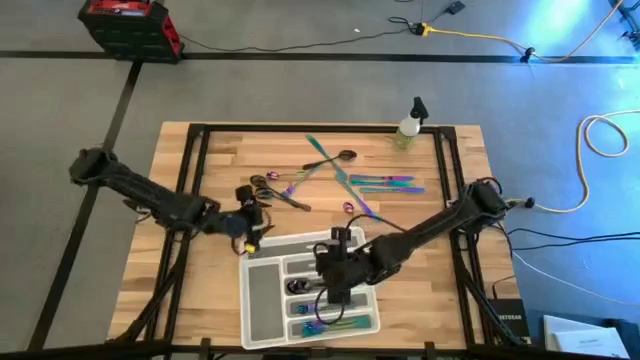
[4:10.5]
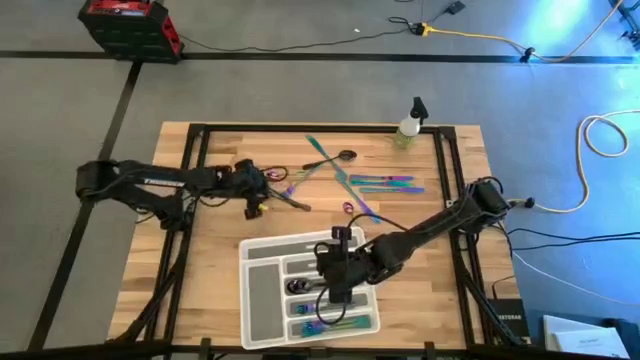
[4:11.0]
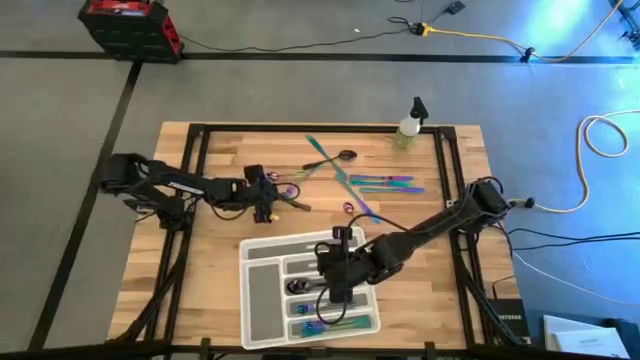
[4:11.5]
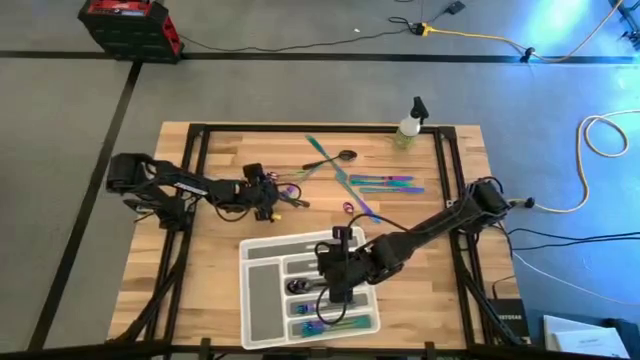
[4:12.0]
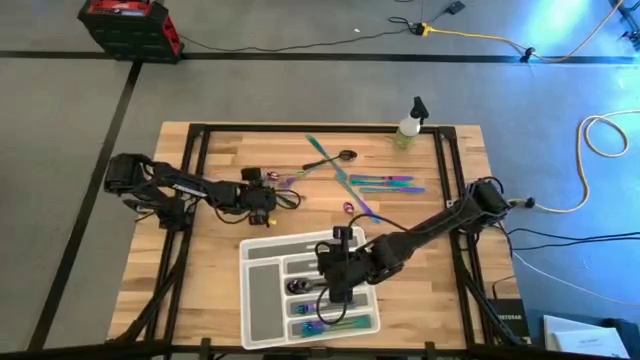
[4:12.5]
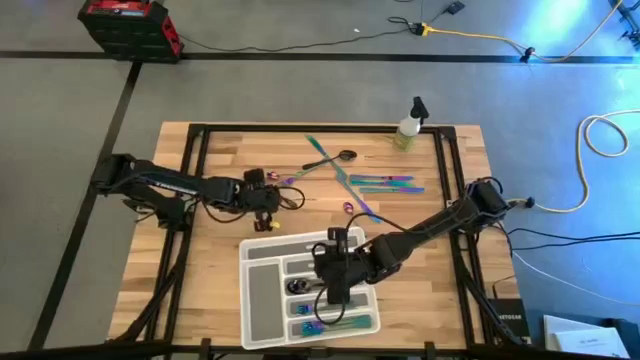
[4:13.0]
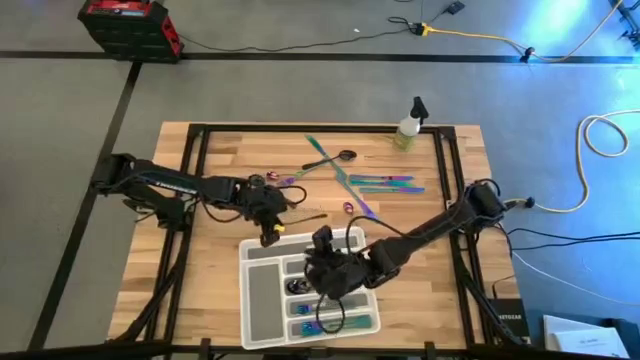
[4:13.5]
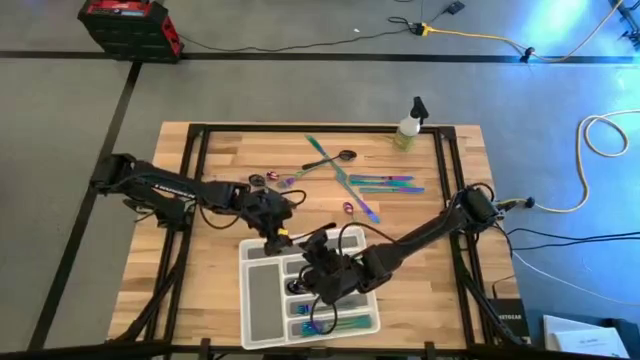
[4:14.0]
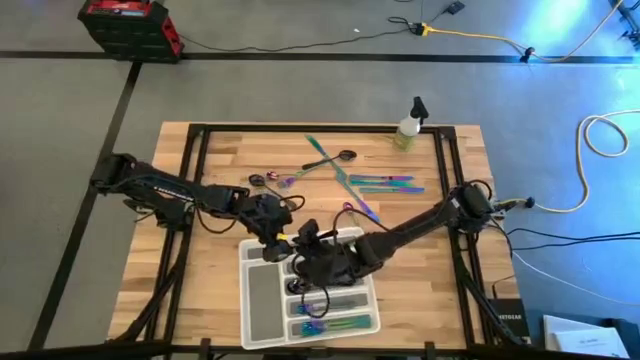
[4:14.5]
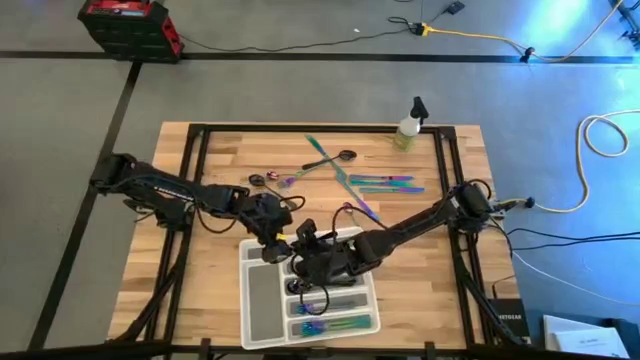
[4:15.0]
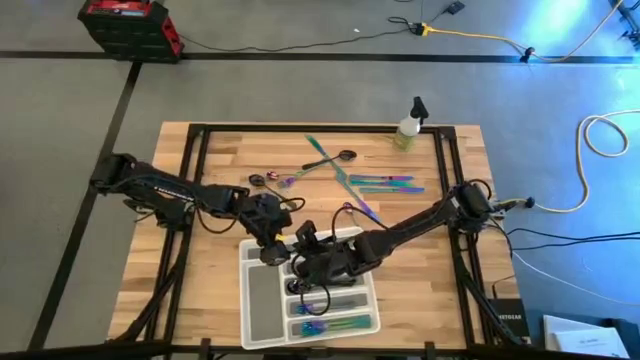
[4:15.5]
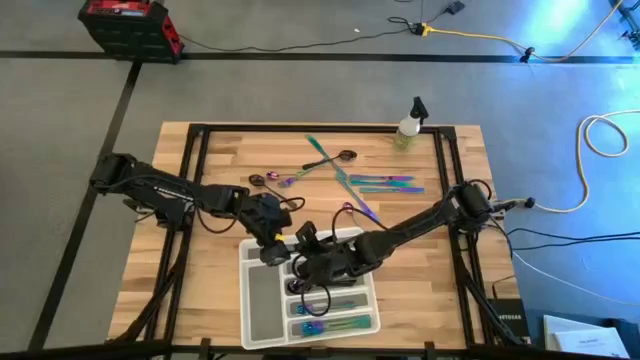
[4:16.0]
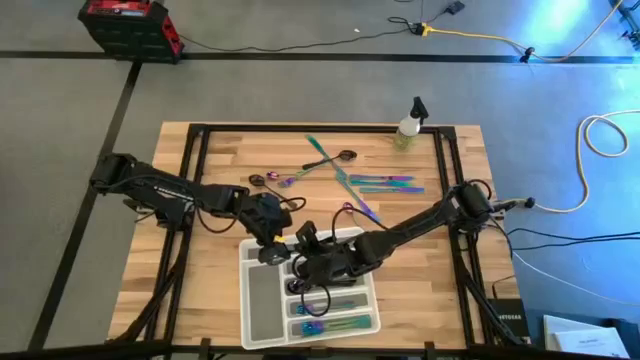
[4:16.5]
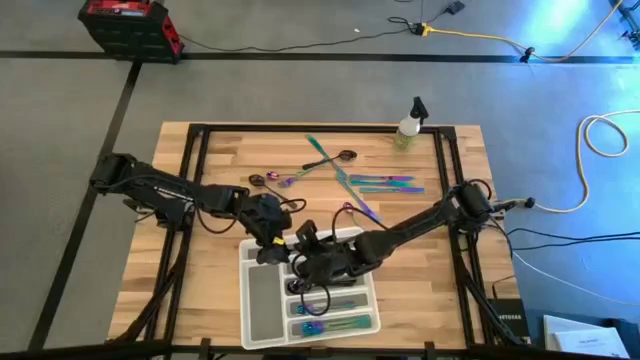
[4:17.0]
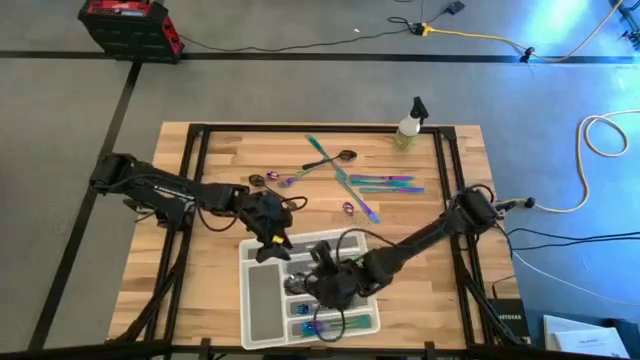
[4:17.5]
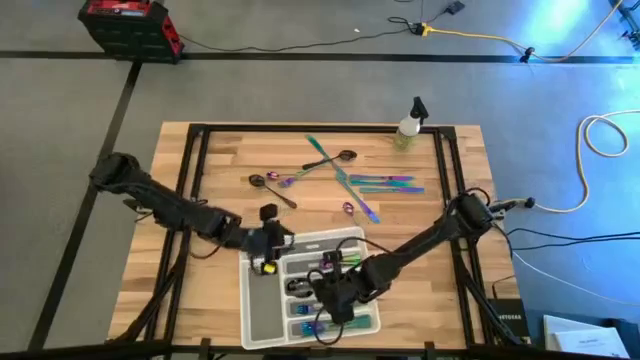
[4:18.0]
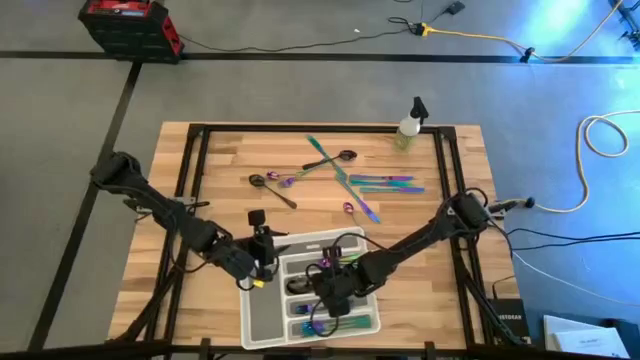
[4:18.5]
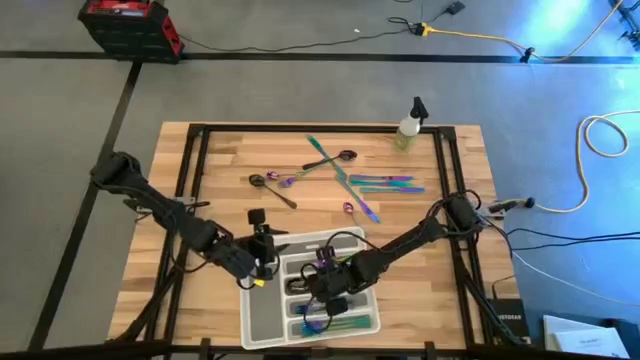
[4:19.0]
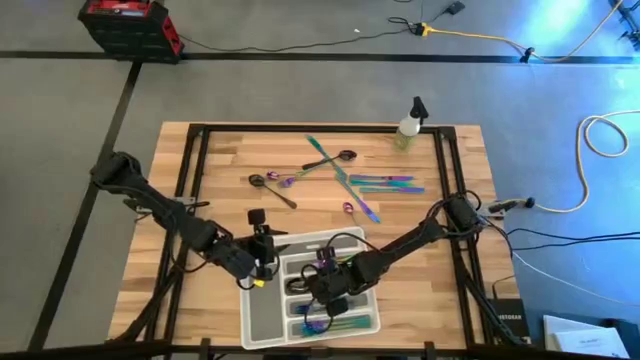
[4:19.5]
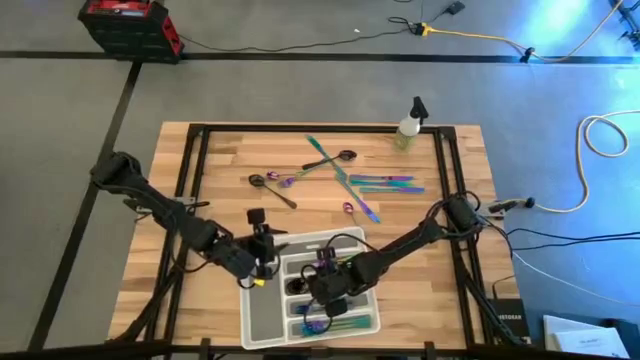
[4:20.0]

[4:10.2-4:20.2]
Task: Sort silverware
Put the black spoon into the white silverware tray

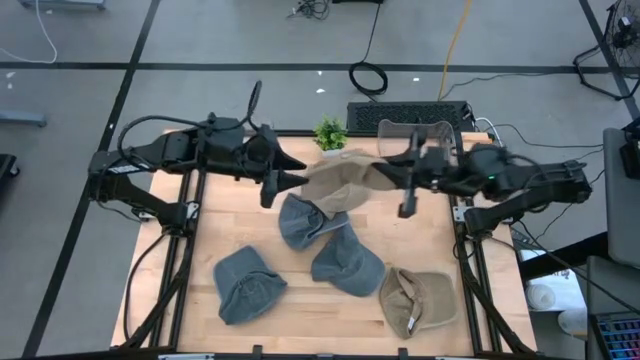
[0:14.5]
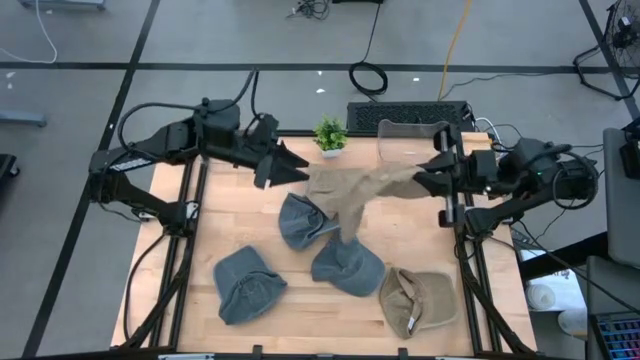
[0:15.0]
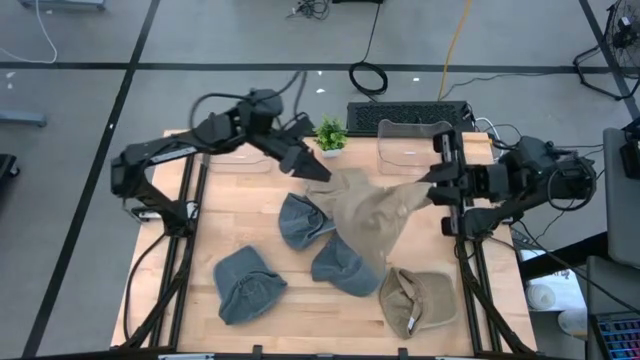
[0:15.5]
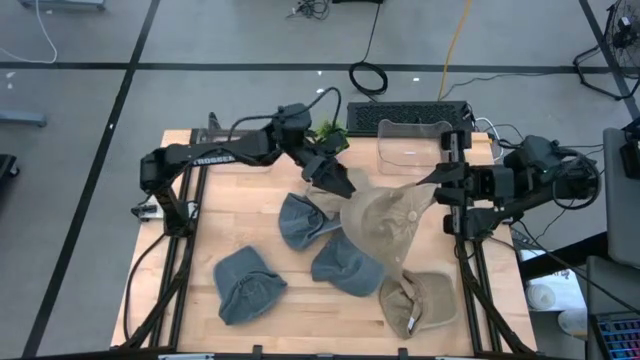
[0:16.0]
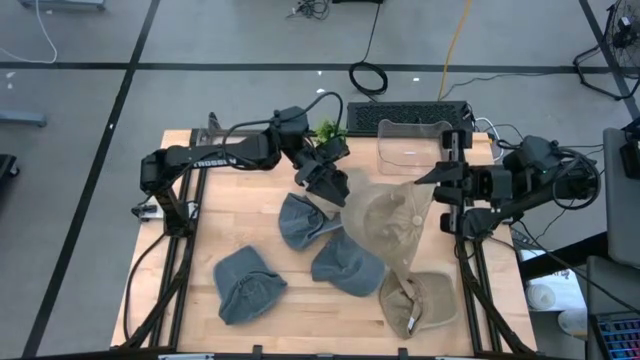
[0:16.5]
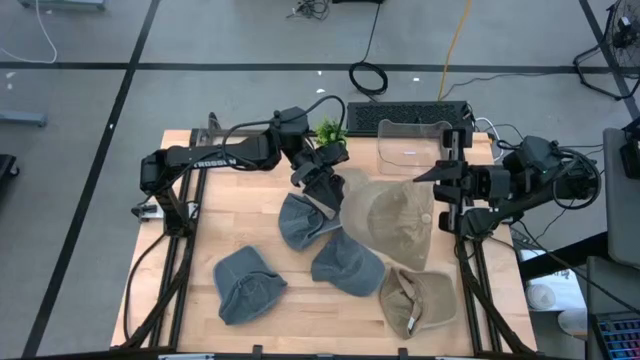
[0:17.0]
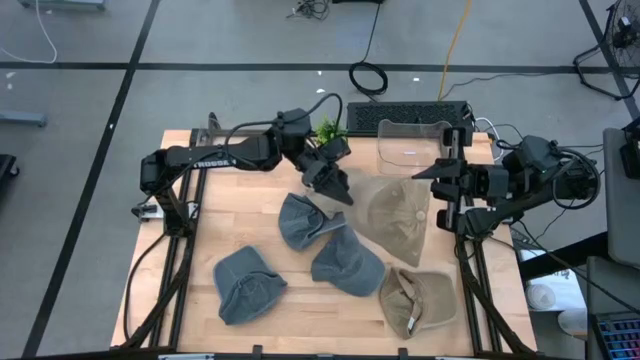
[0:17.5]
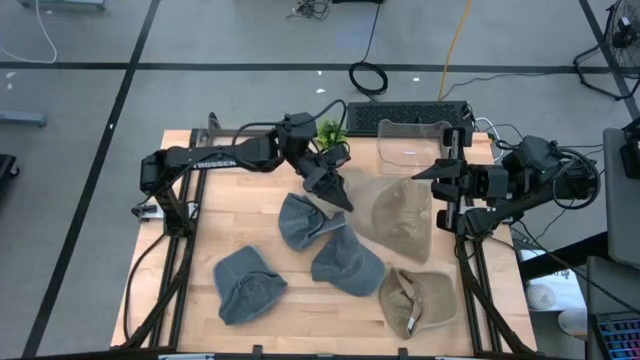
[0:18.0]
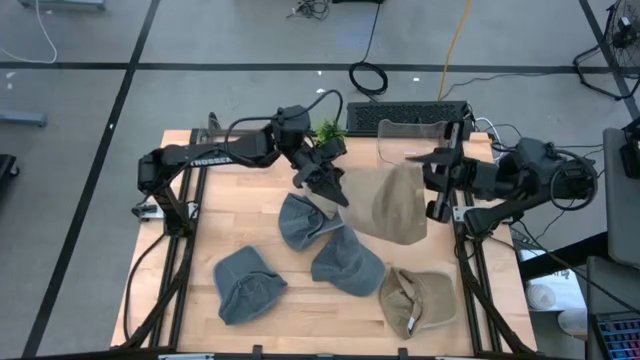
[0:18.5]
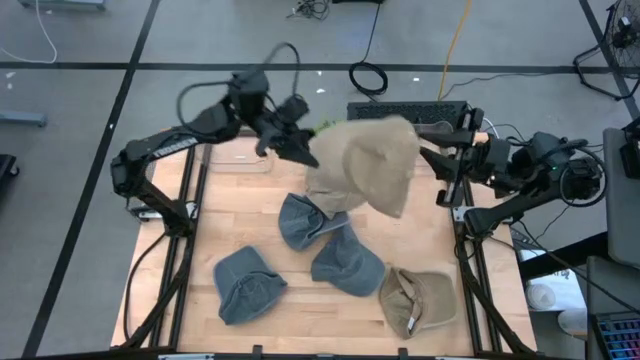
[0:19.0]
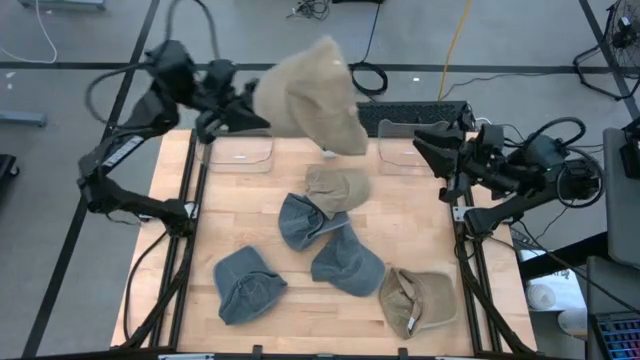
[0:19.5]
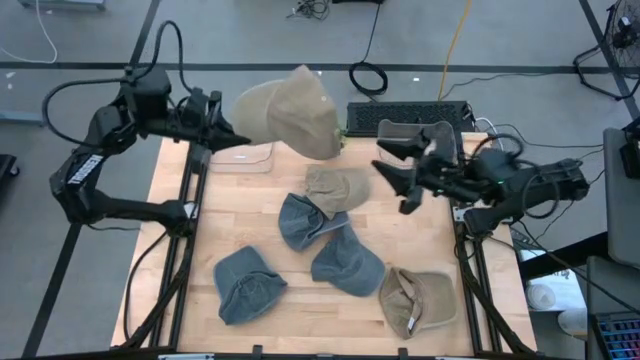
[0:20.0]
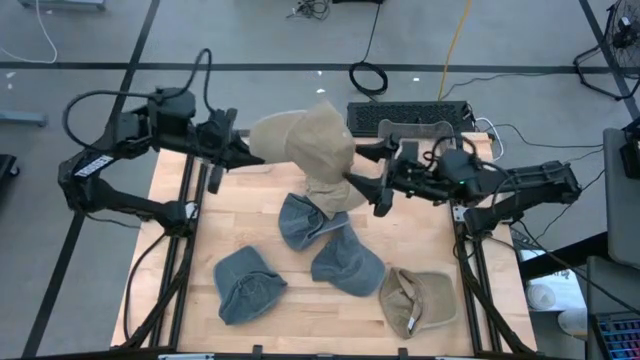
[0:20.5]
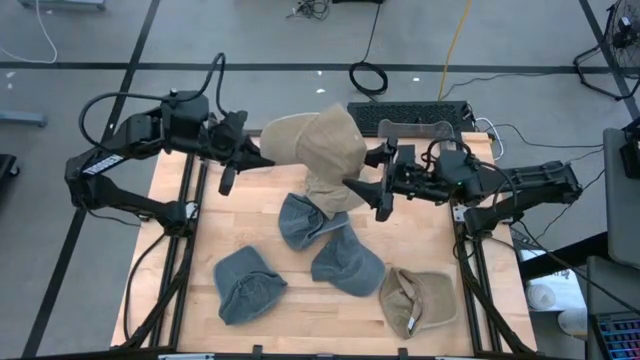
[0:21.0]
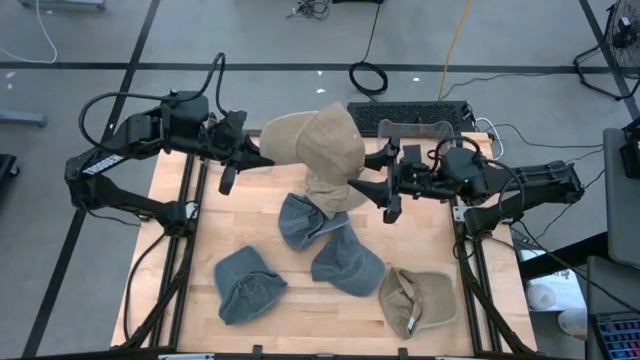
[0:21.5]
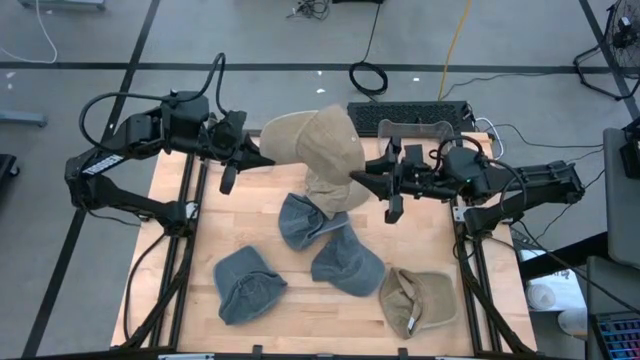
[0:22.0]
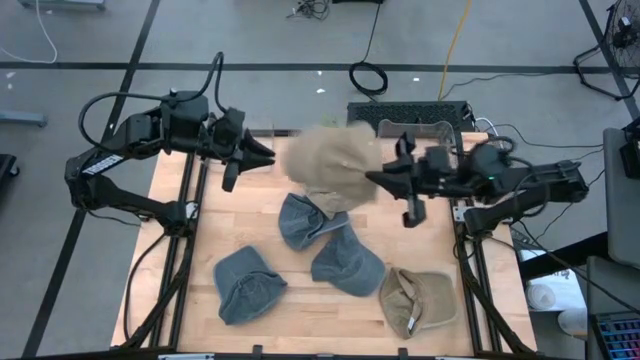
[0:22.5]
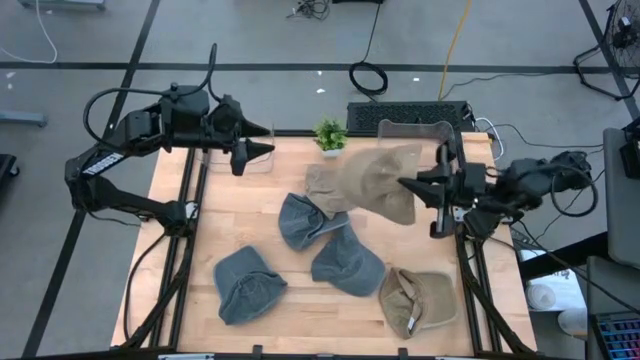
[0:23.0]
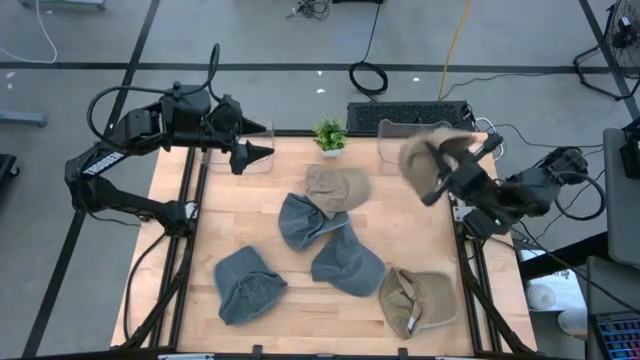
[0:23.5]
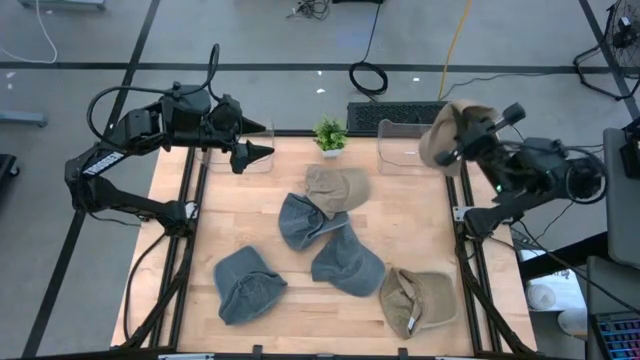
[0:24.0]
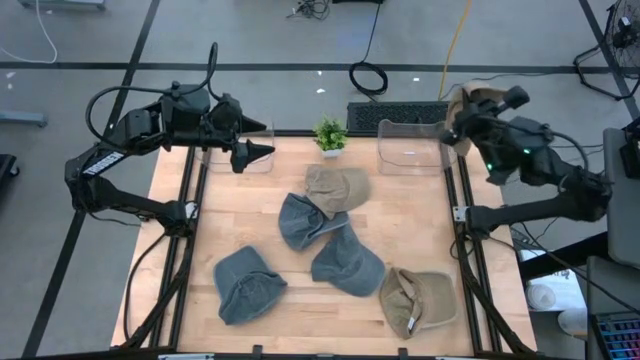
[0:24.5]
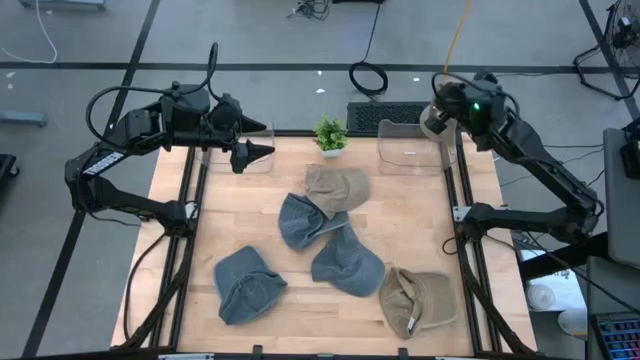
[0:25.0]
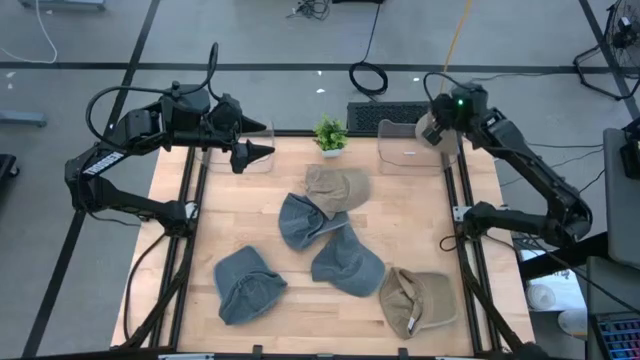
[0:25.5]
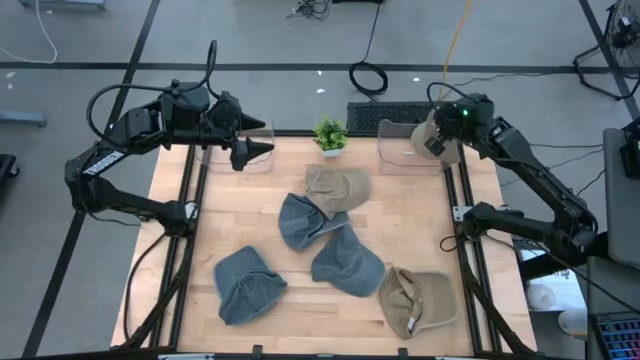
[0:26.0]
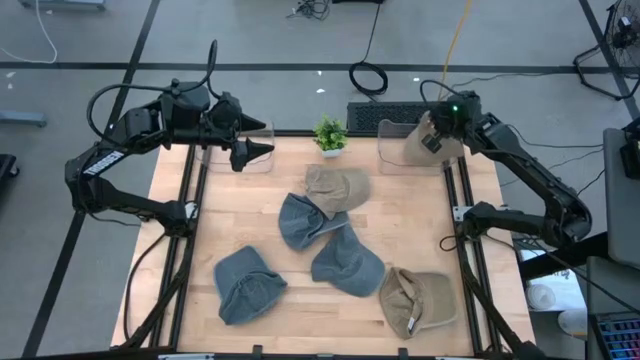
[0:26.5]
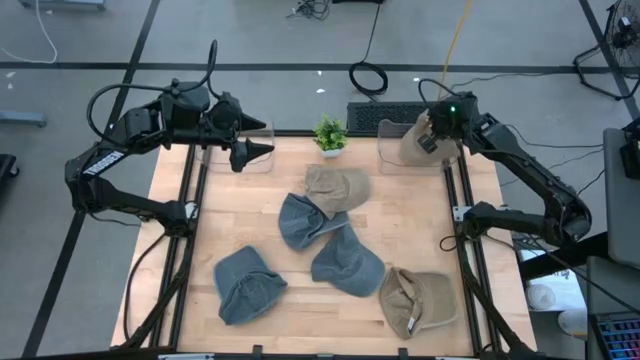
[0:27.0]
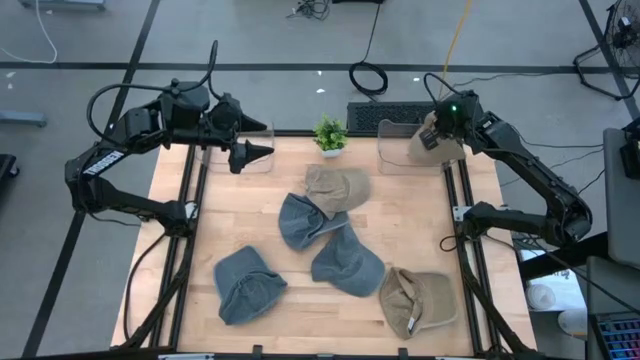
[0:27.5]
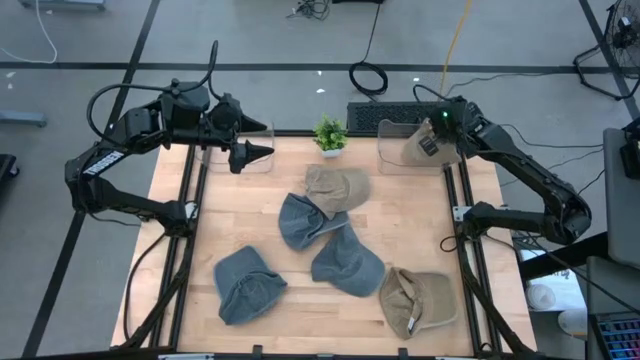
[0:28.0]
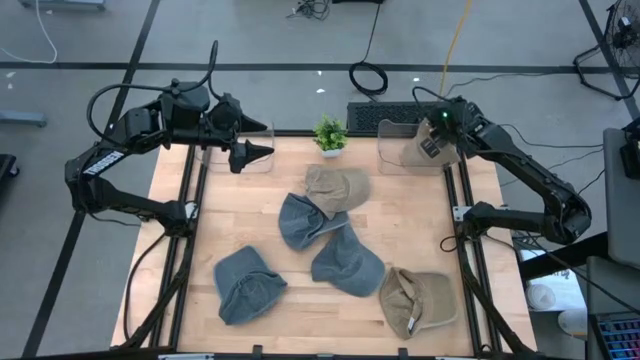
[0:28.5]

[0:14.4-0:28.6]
Task: Pick & Place hat
Put the top left brown cap into the right transparent bin
